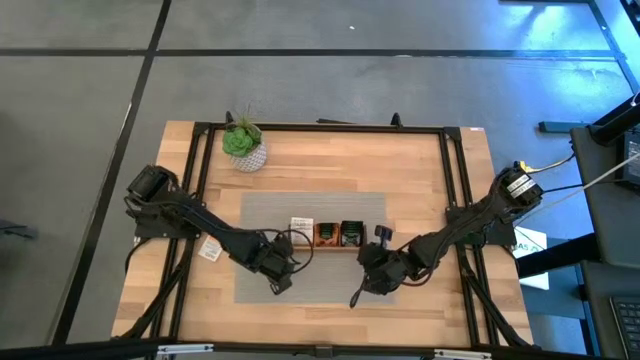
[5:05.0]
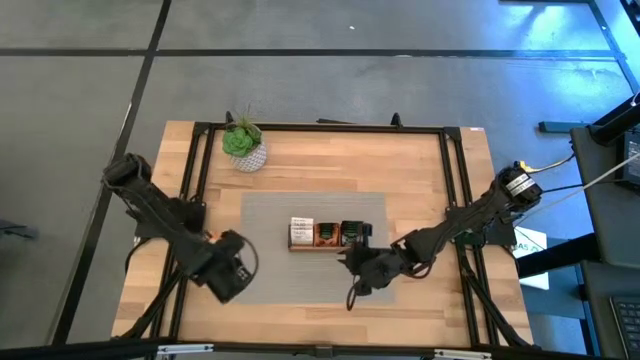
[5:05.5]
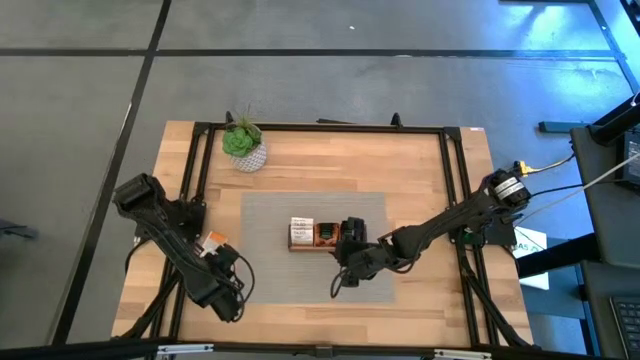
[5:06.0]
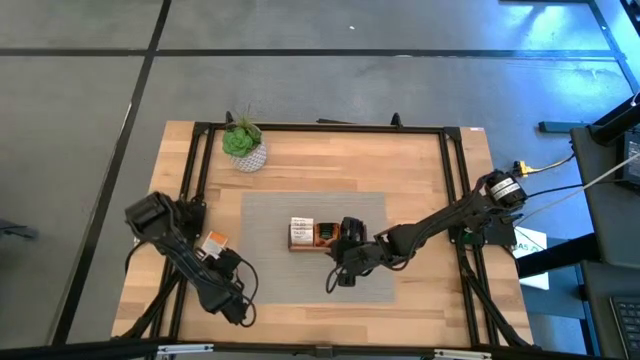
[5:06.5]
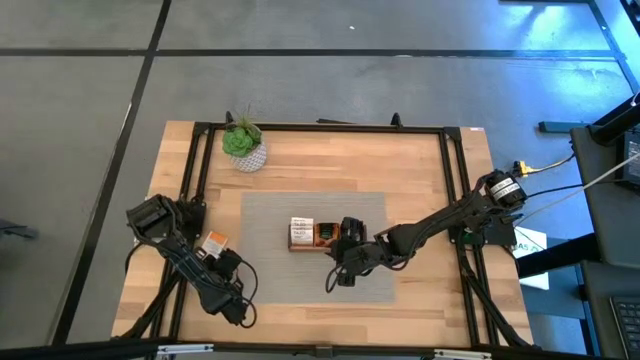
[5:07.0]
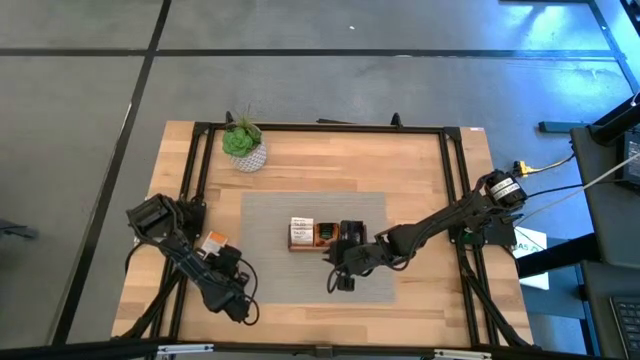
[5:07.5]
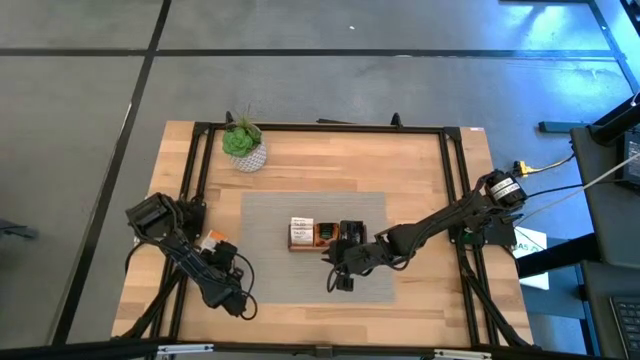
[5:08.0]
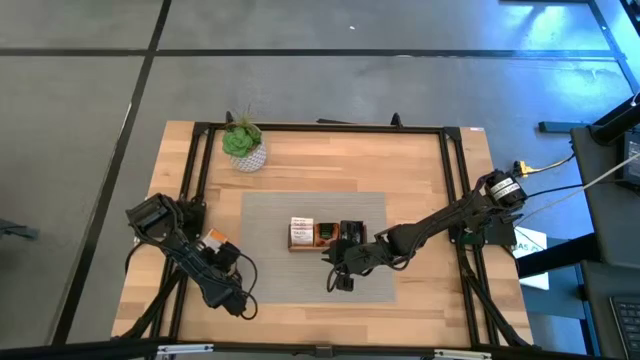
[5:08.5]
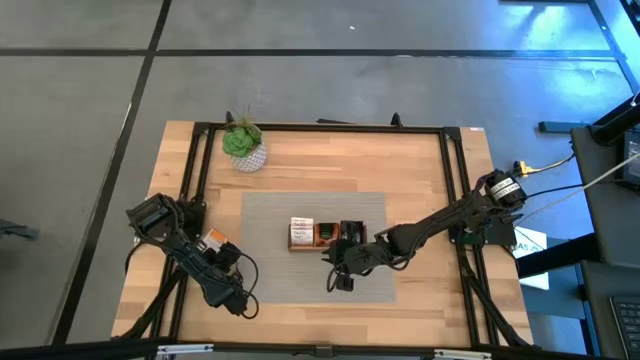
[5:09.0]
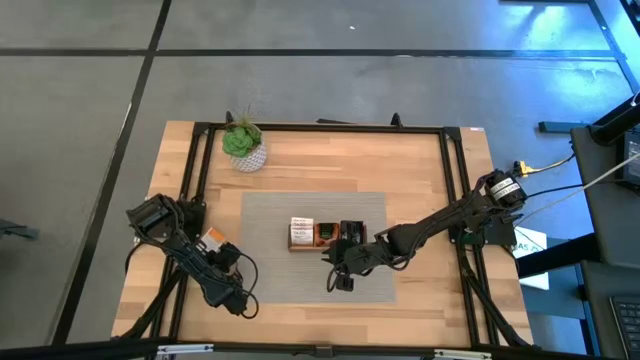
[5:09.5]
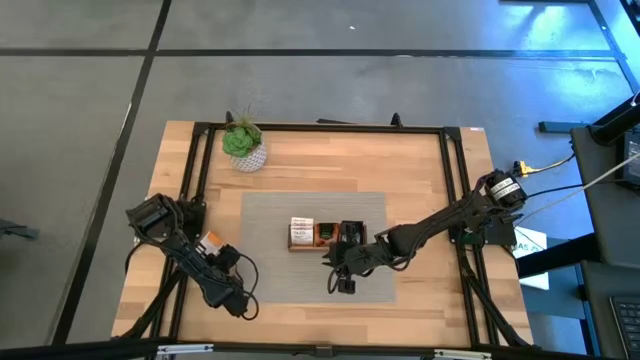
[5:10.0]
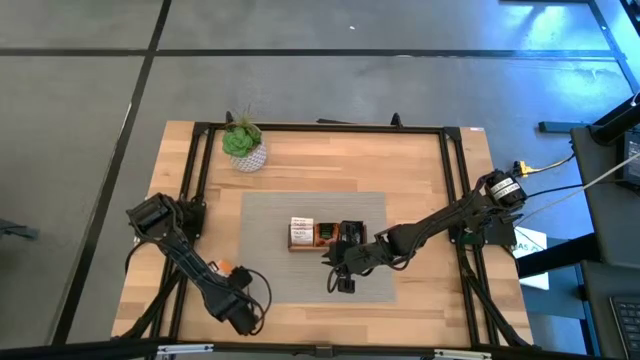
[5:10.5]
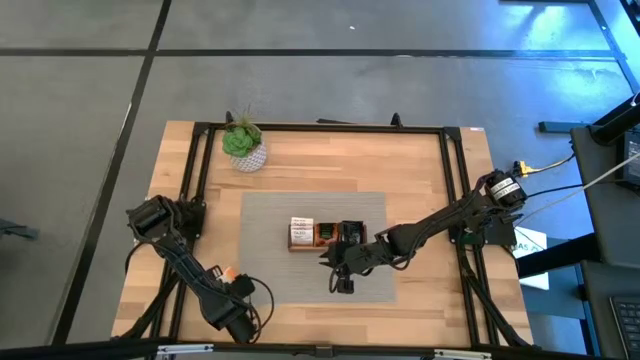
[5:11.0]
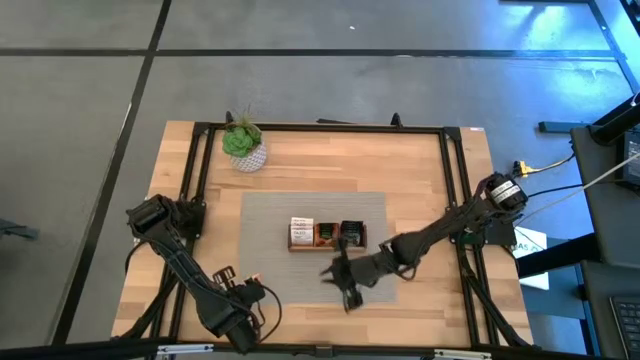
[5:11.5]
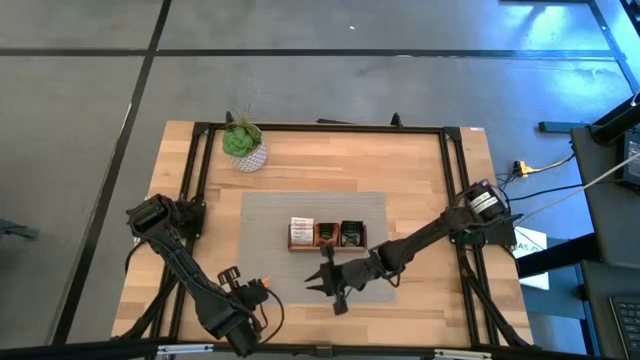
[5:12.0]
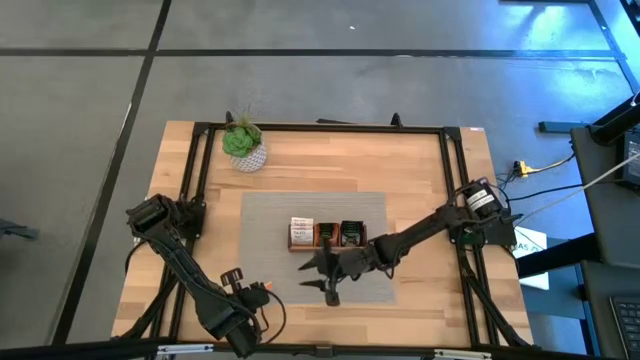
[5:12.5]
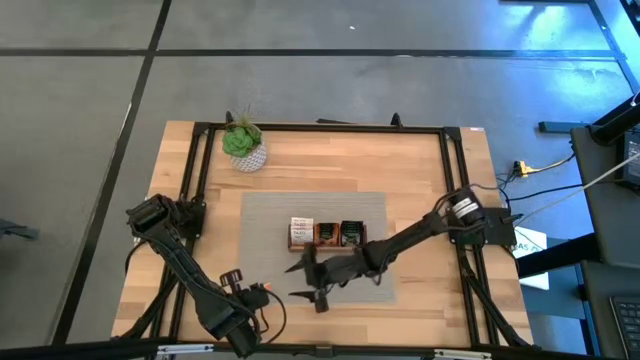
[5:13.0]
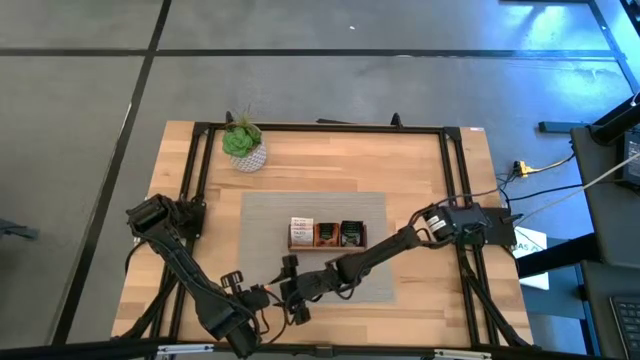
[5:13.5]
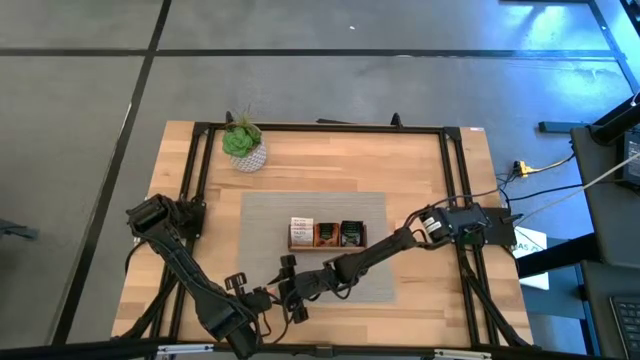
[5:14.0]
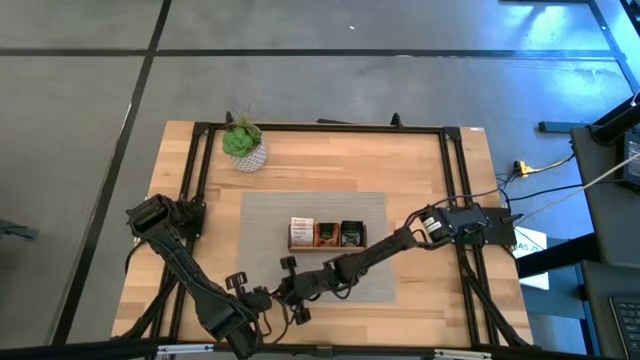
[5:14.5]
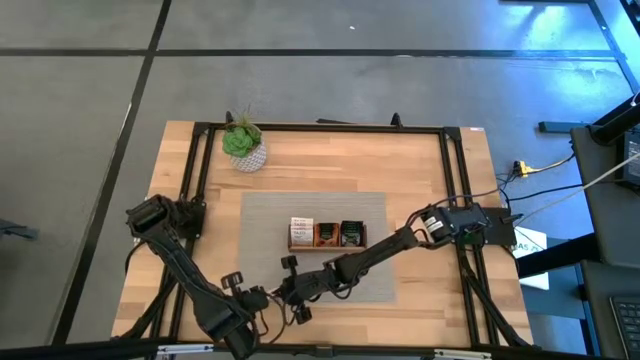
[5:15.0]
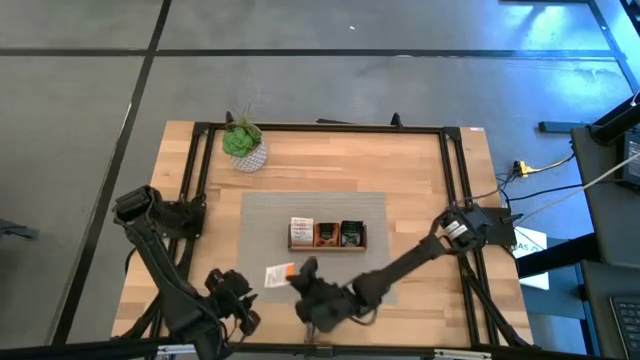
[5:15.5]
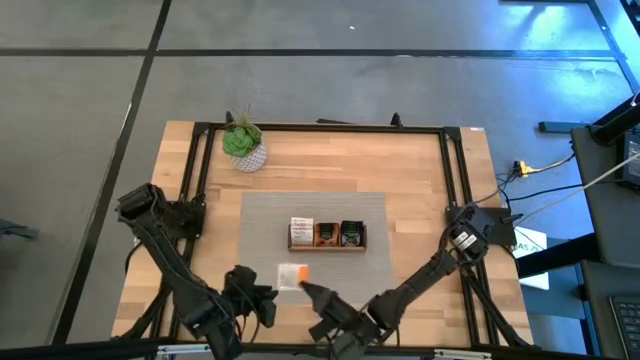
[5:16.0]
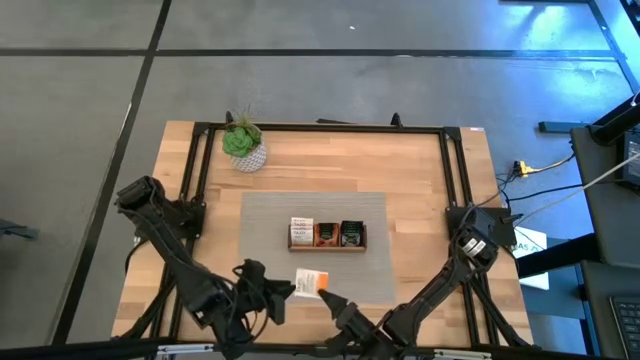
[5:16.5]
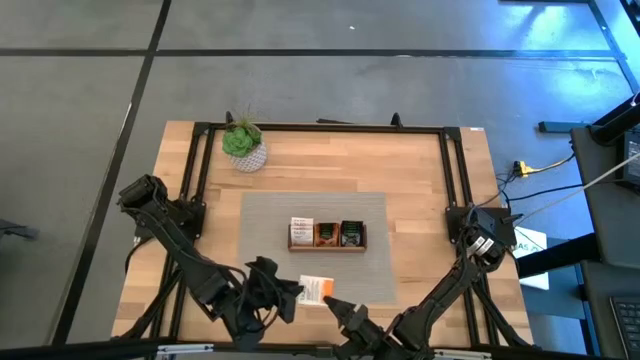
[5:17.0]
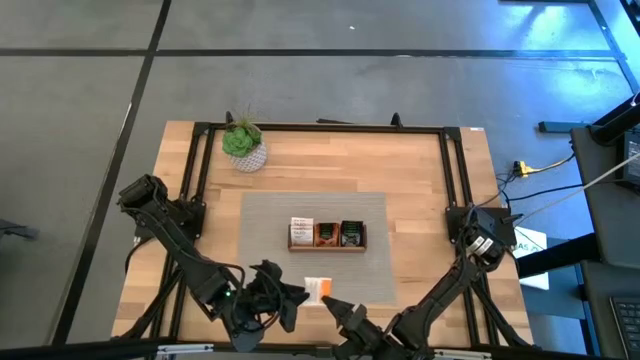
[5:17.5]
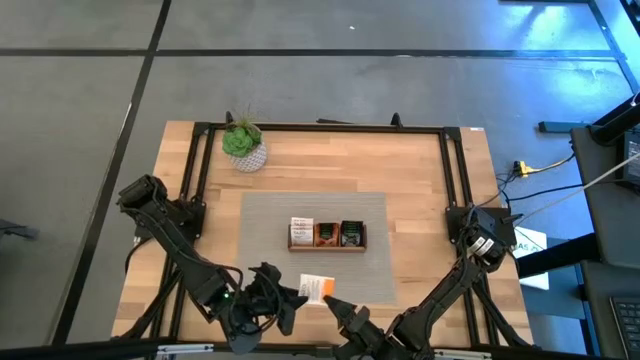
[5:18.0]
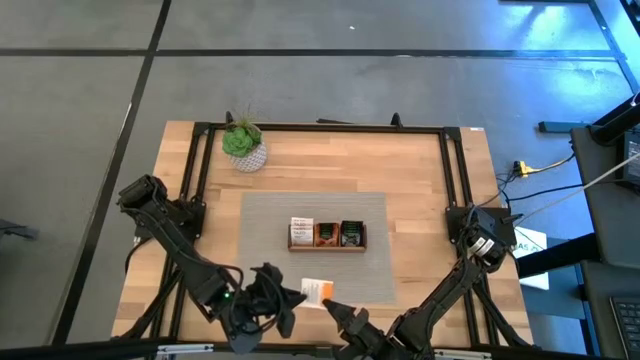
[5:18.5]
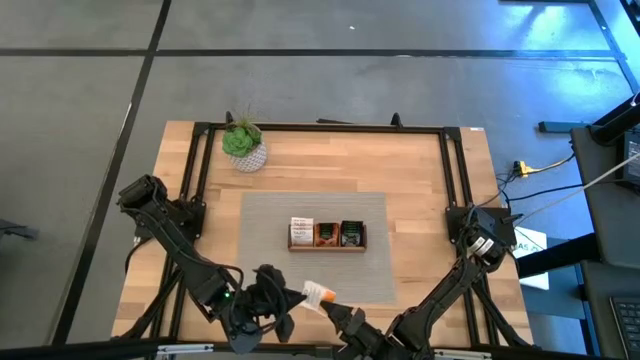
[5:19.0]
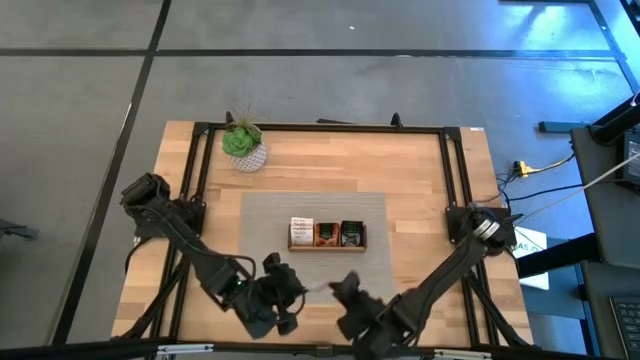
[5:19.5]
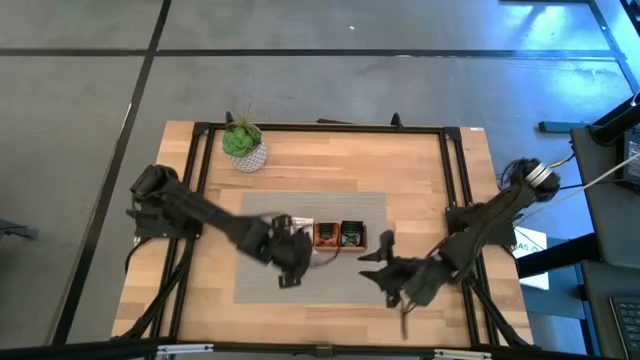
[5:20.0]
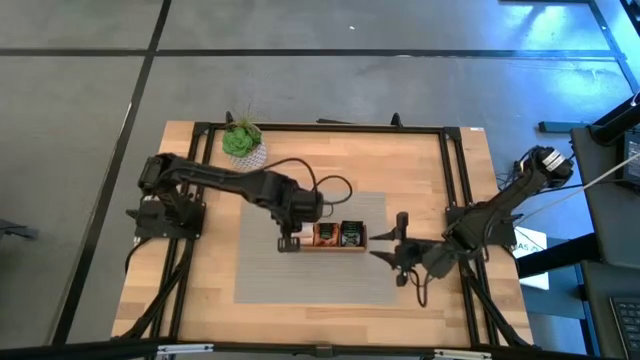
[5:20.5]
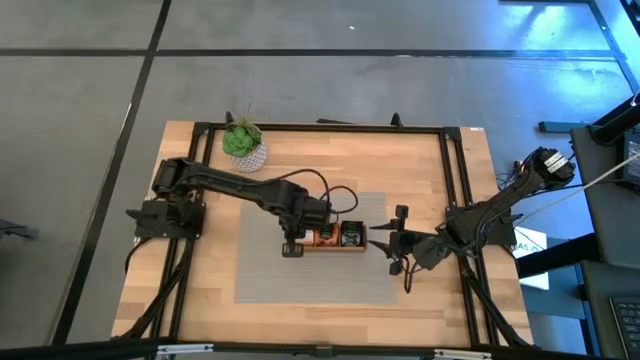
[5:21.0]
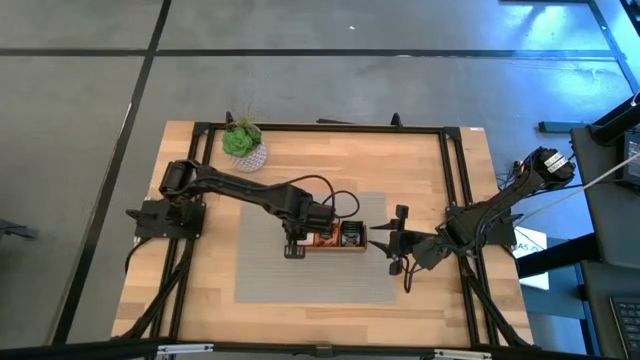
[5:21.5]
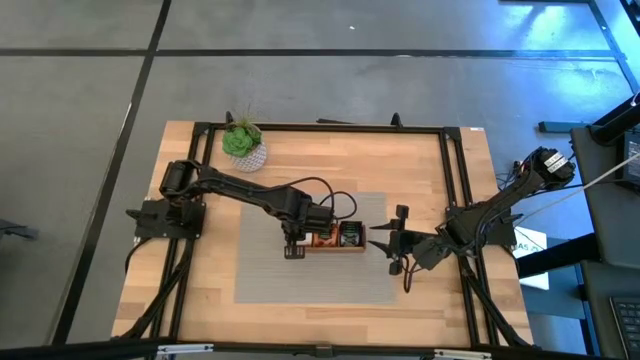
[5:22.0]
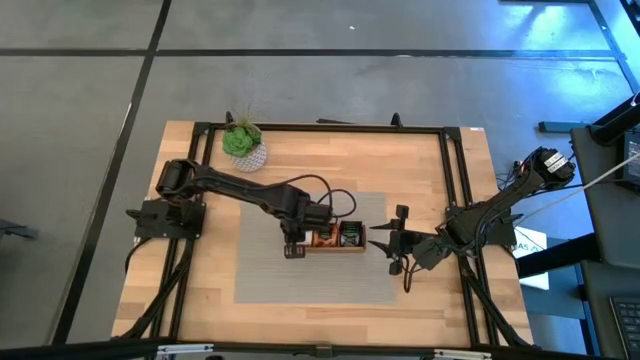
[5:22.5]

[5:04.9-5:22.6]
Task: Pick & Place Tea
Put the white tea bag into the left section of the wooden organizer

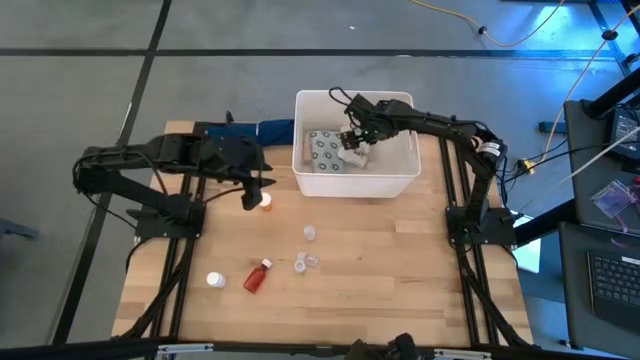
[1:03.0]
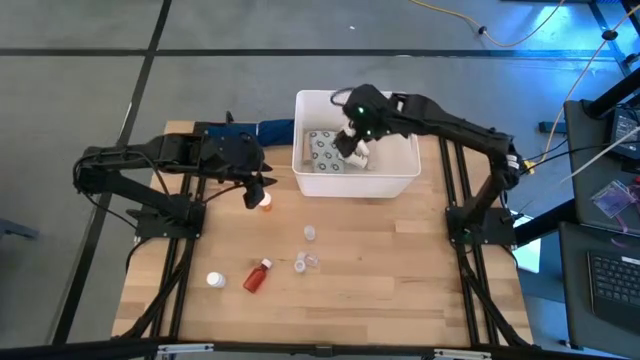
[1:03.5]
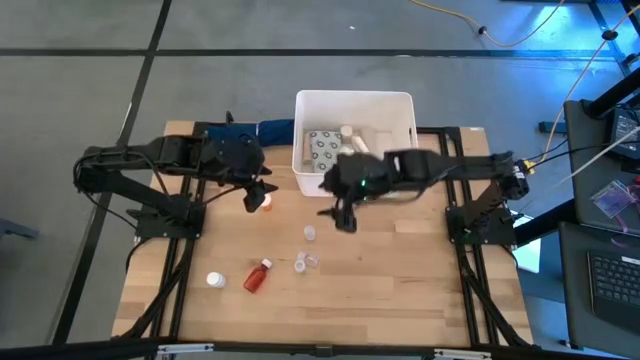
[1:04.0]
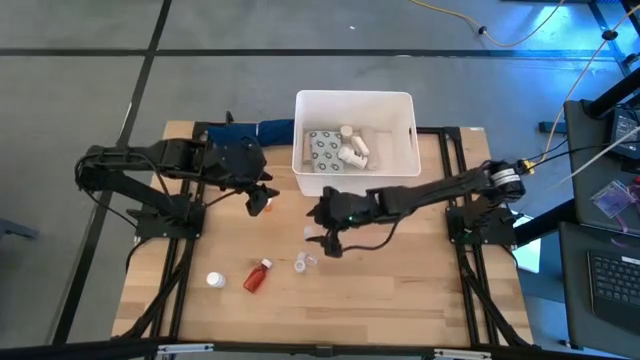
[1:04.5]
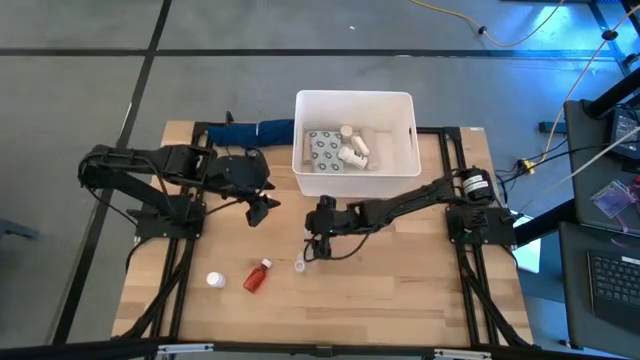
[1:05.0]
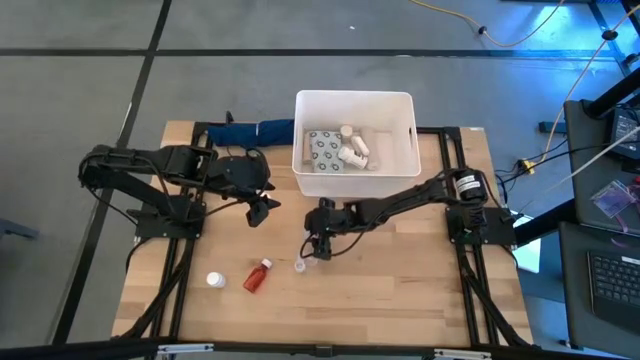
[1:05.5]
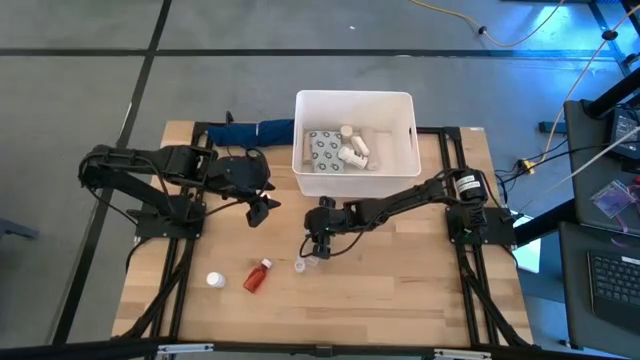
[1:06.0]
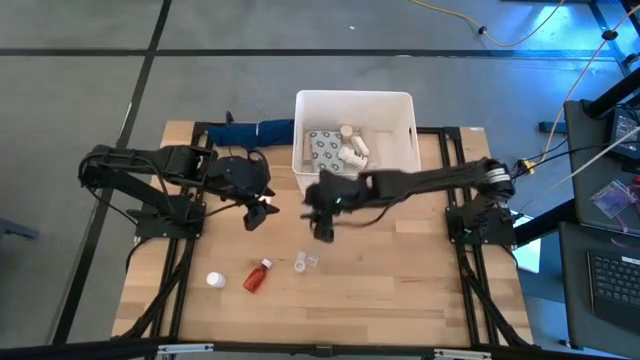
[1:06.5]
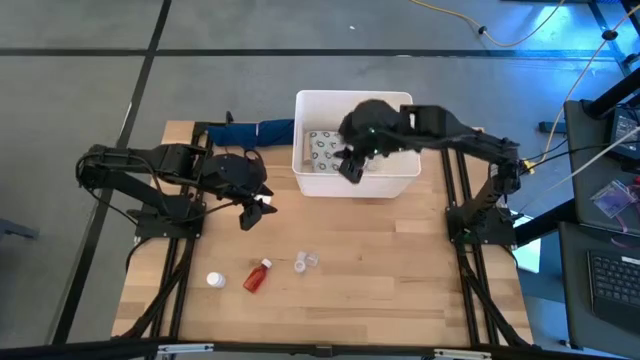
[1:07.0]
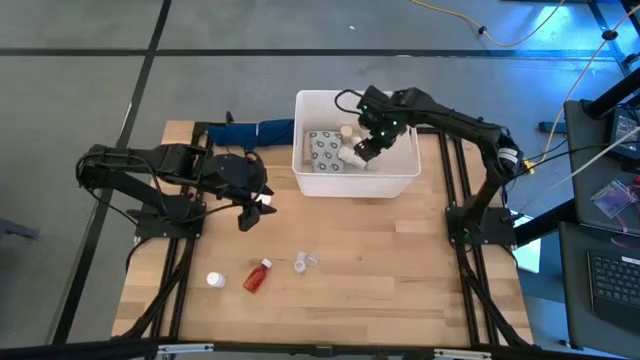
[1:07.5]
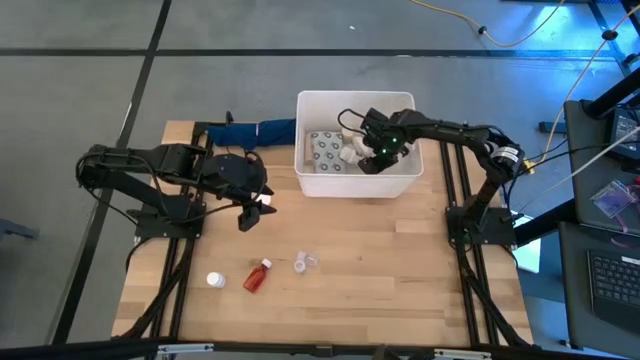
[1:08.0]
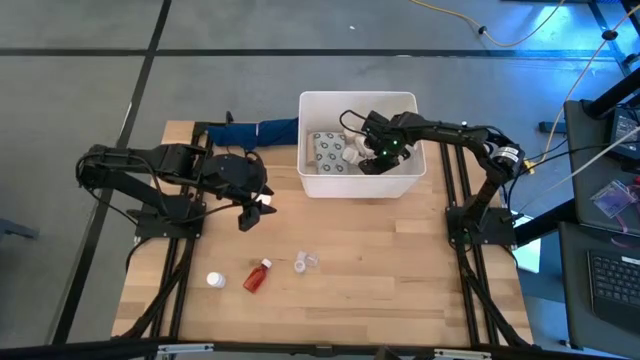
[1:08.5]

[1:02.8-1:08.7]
Task: Pick & place medical supplies in basket/bin
Put the top transparent pill bottle into the white bin
